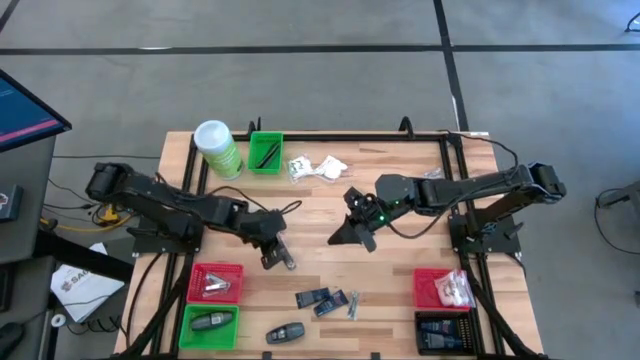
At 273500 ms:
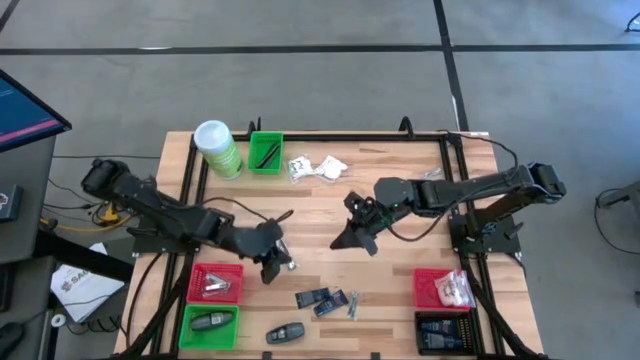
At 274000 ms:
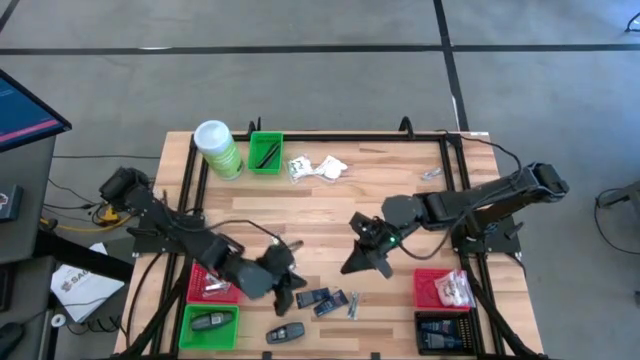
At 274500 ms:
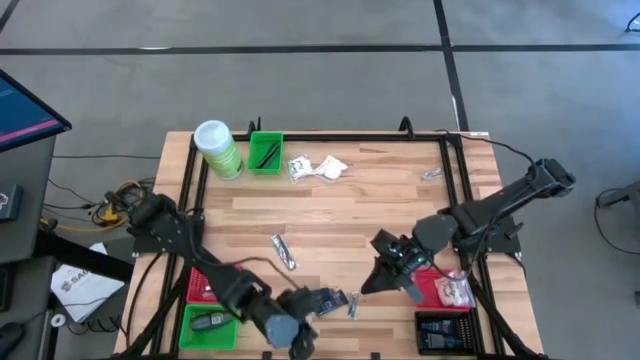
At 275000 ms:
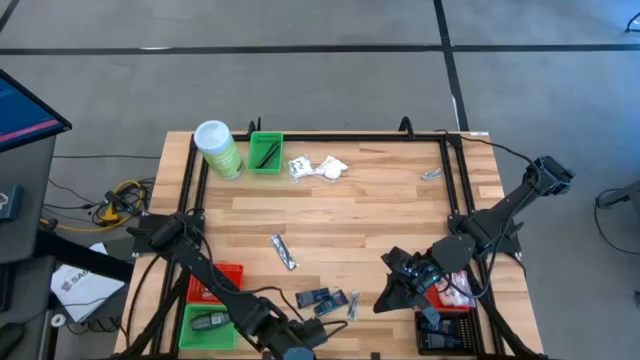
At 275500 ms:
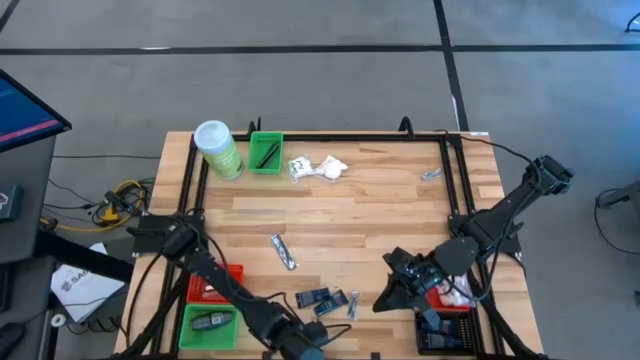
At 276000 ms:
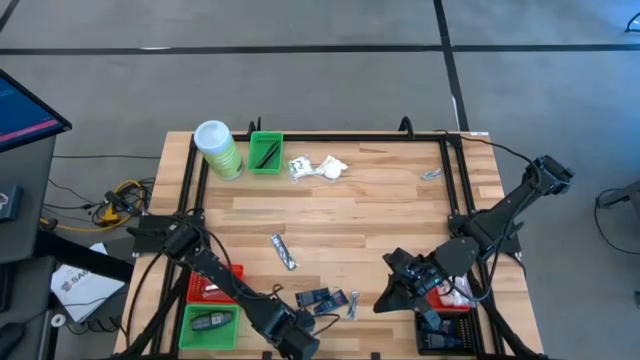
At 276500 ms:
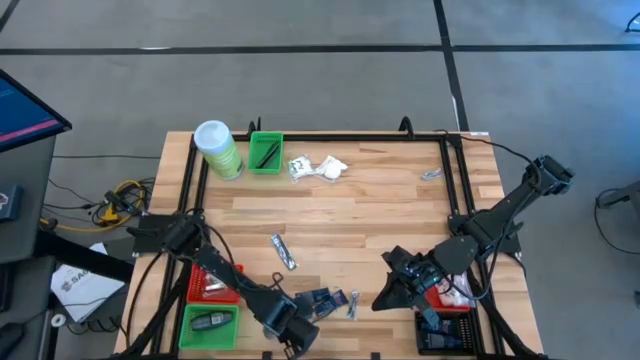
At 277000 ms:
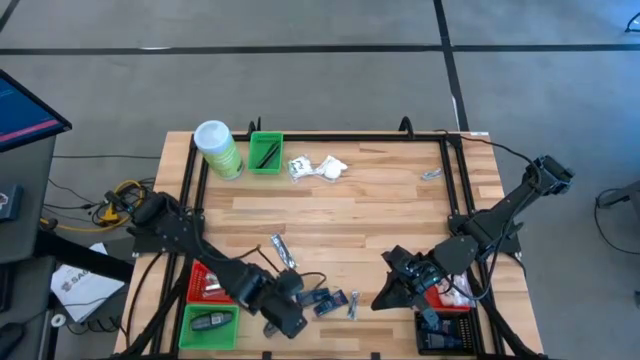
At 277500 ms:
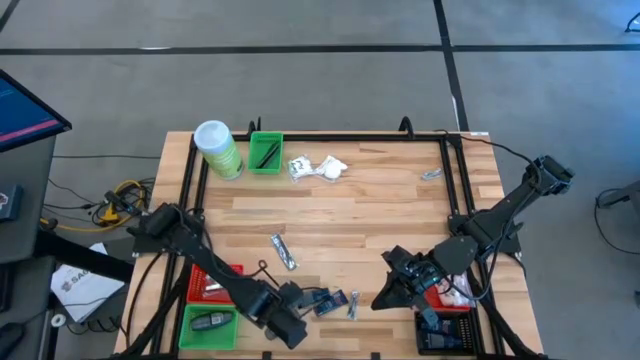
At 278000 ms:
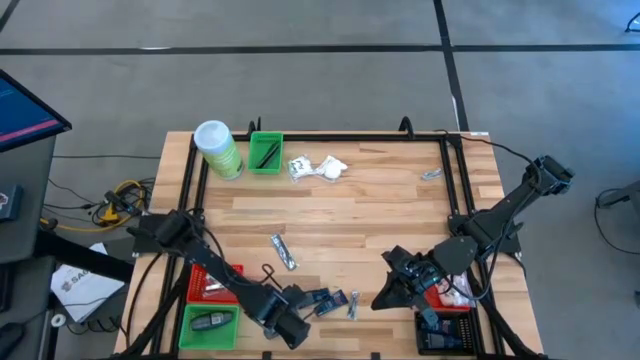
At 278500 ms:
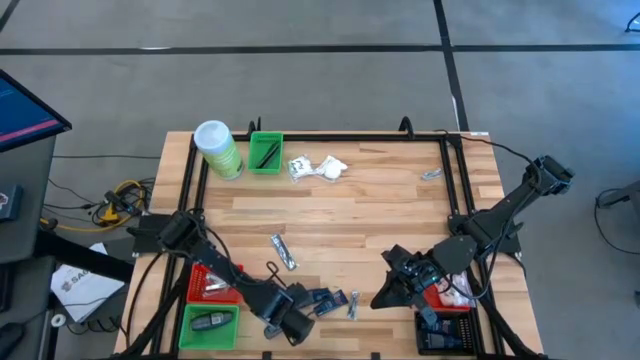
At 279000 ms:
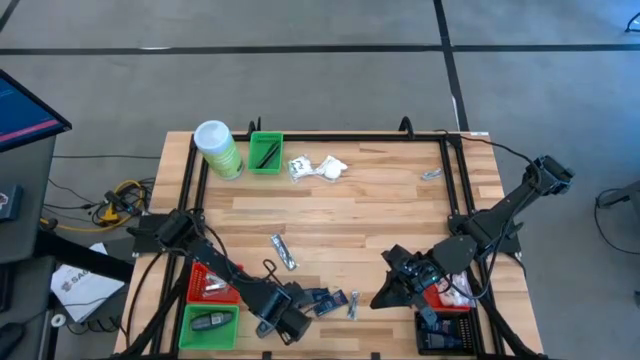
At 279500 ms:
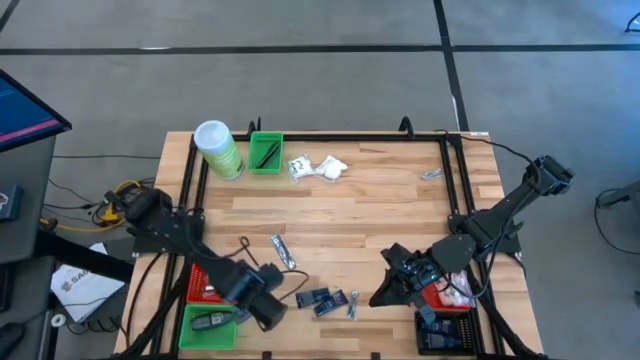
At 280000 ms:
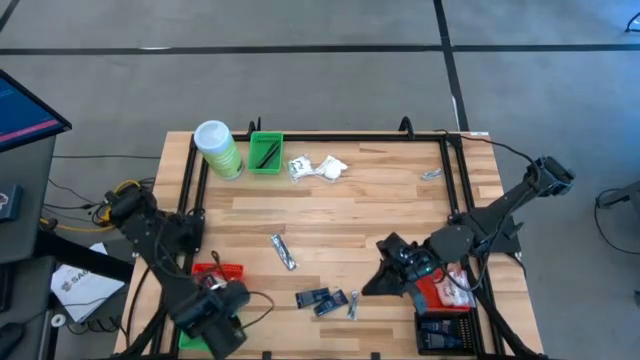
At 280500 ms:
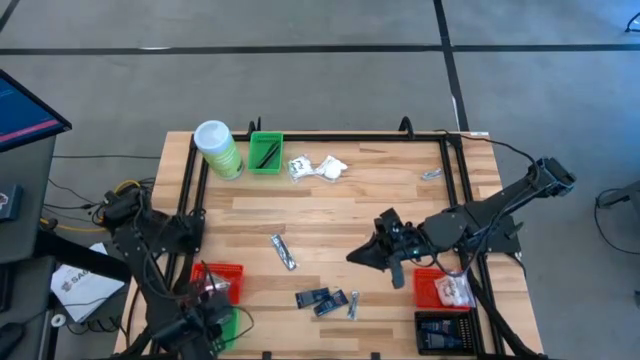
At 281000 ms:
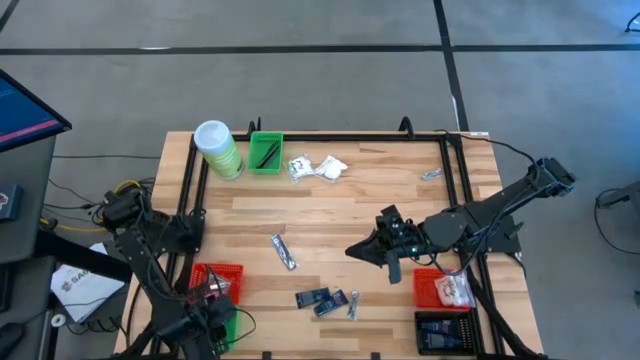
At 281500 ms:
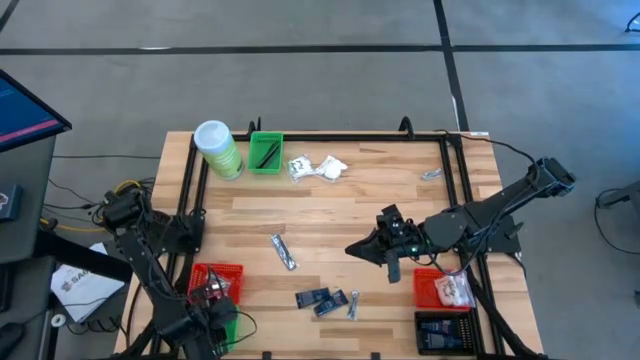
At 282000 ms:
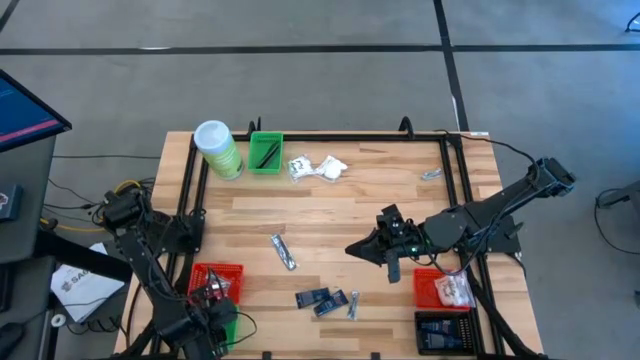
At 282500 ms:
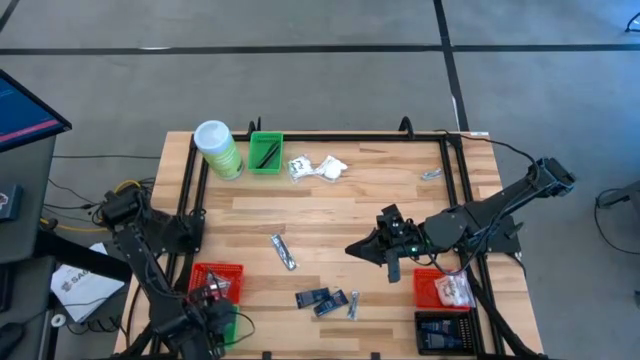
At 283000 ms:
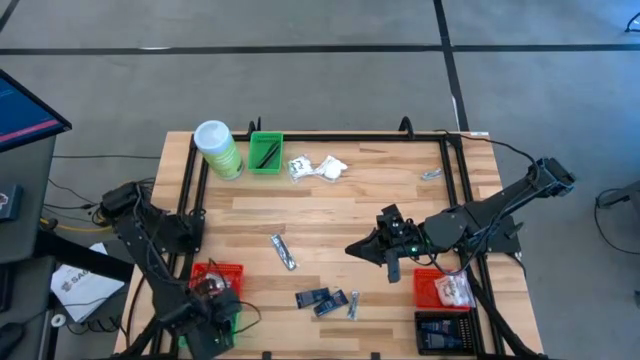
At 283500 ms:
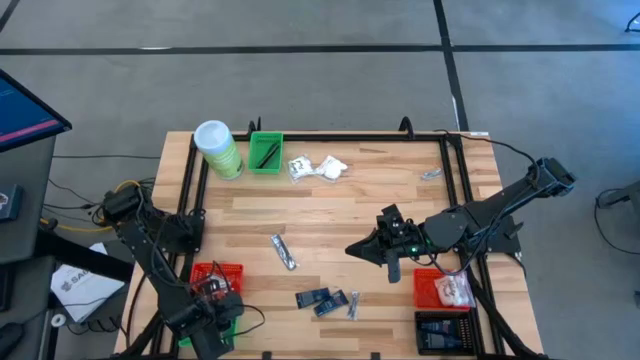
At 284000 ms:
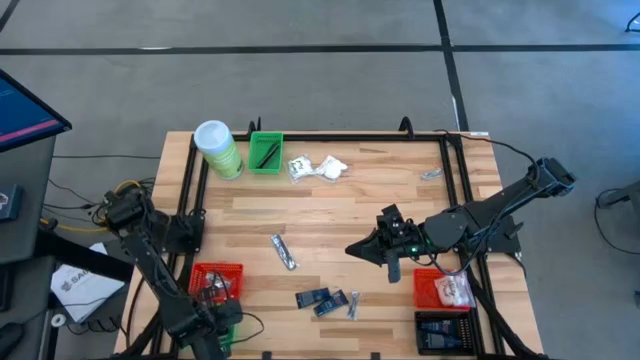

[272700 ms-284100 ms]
Task: Pick & Place Travel size toiletries
Put the deodorant into the bottom green bin

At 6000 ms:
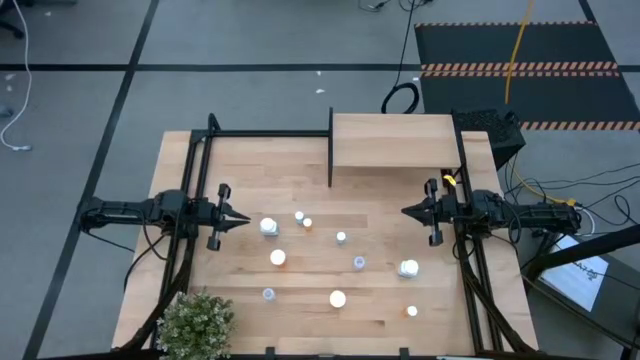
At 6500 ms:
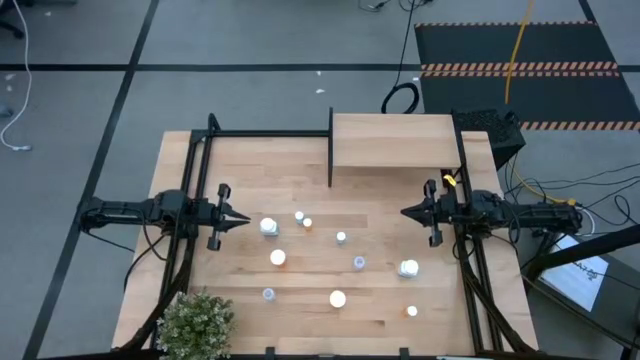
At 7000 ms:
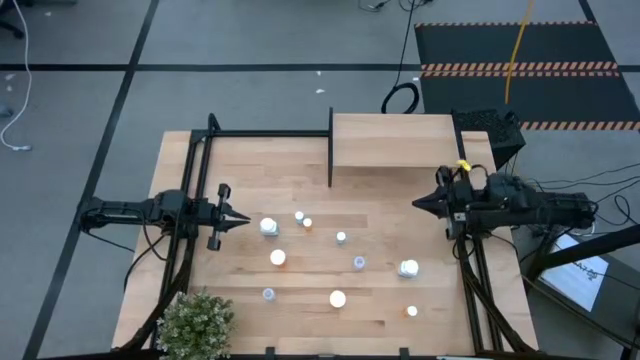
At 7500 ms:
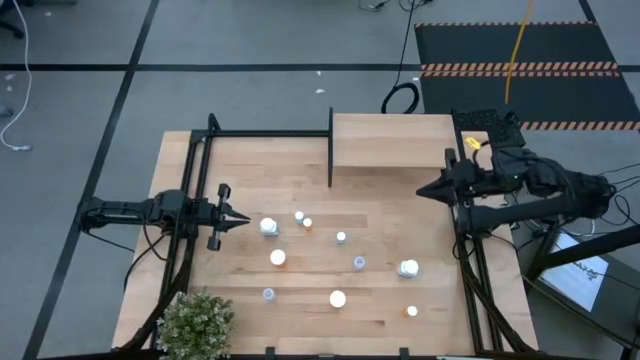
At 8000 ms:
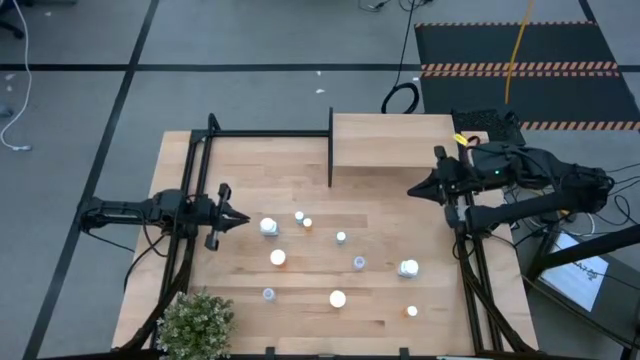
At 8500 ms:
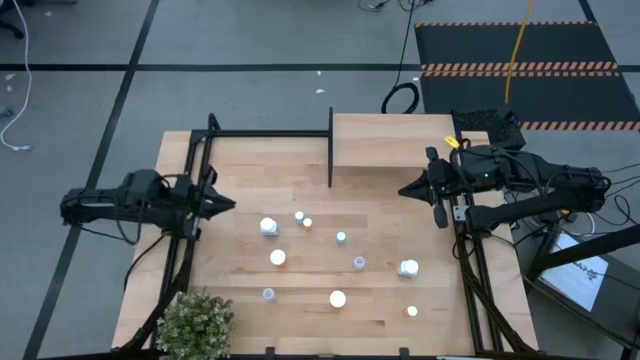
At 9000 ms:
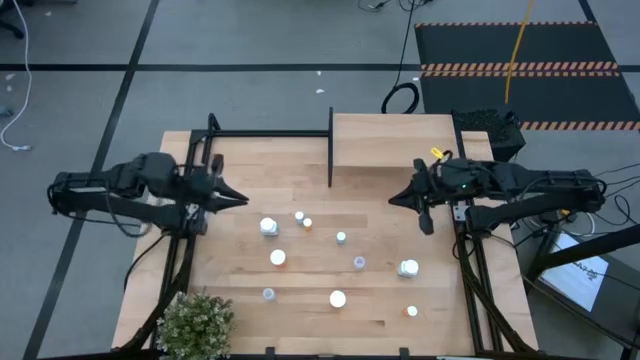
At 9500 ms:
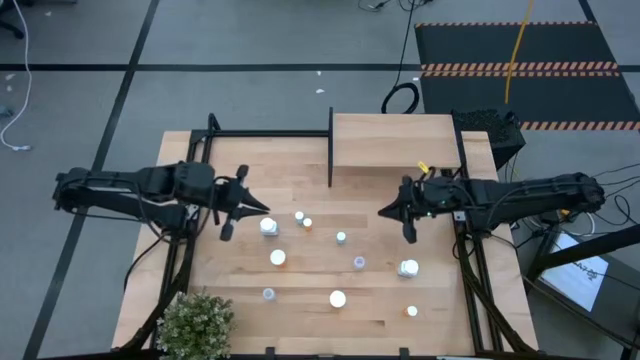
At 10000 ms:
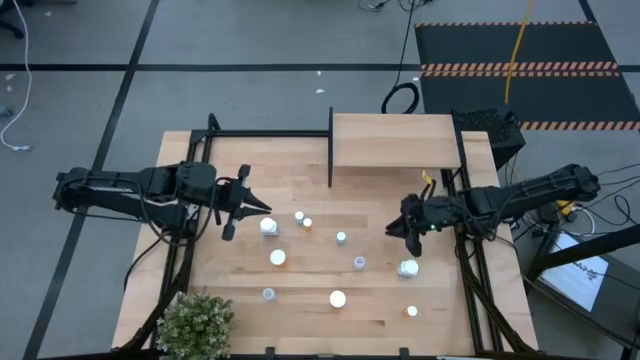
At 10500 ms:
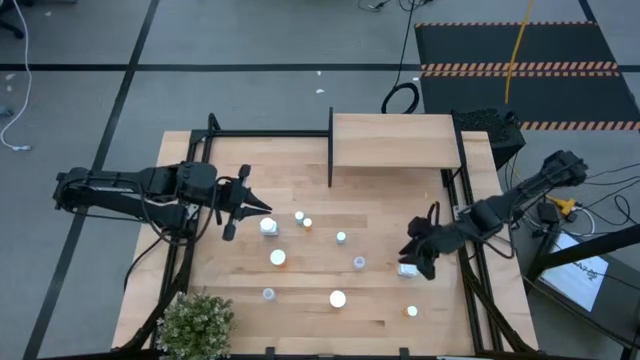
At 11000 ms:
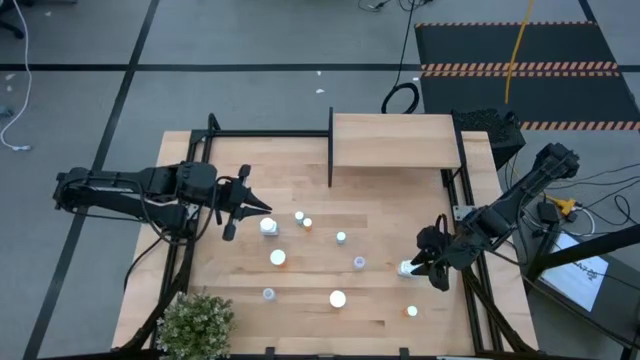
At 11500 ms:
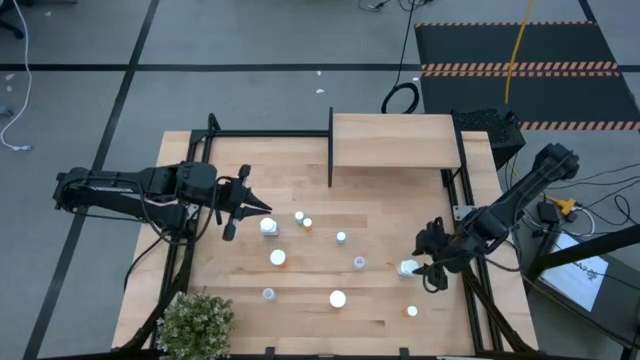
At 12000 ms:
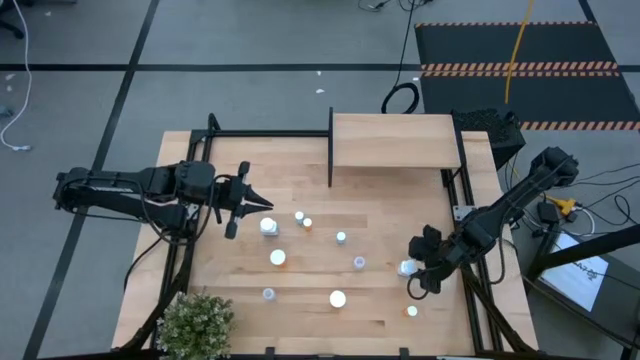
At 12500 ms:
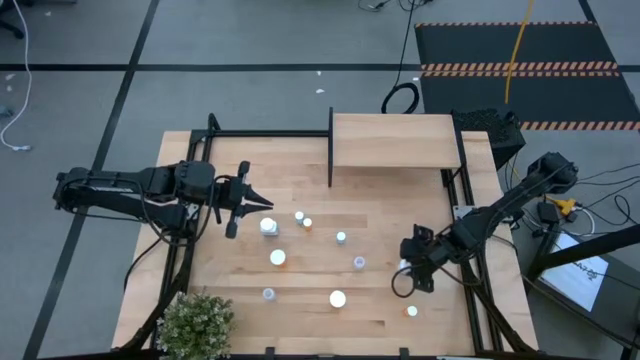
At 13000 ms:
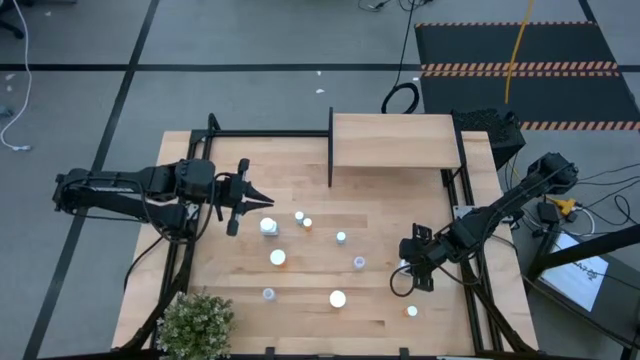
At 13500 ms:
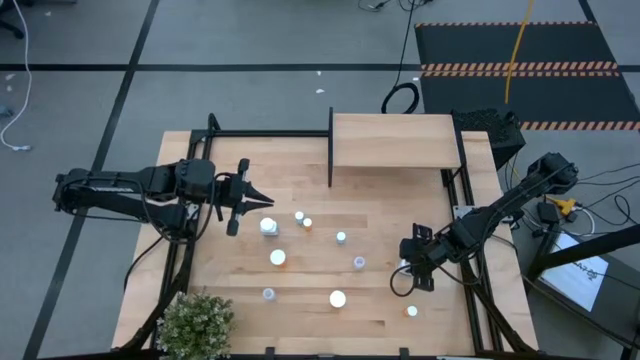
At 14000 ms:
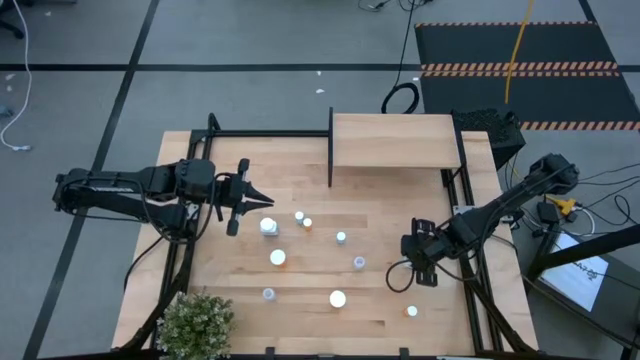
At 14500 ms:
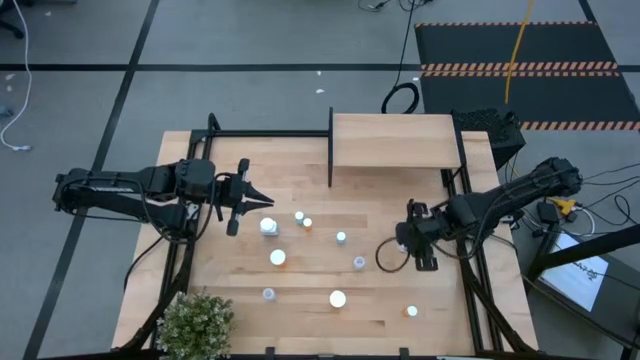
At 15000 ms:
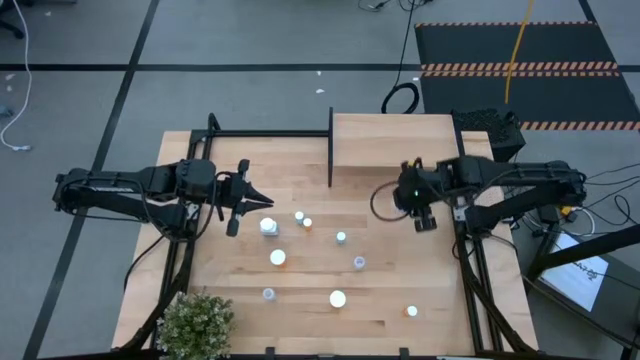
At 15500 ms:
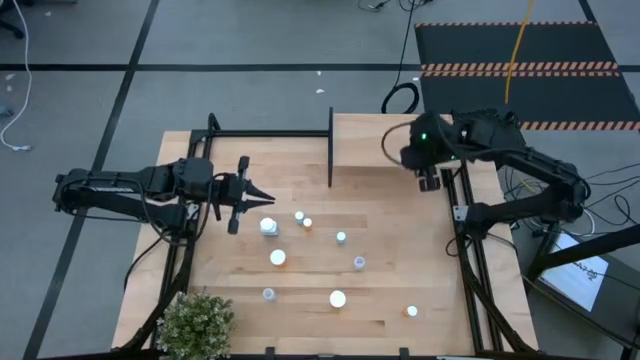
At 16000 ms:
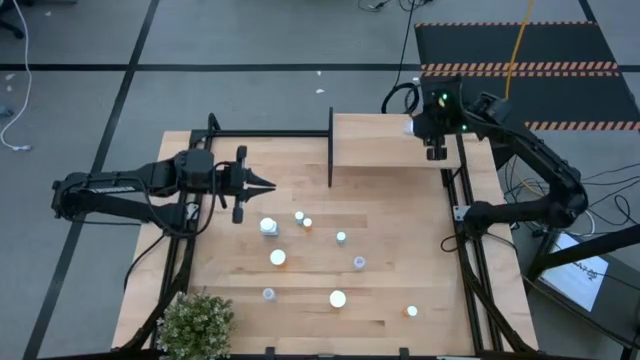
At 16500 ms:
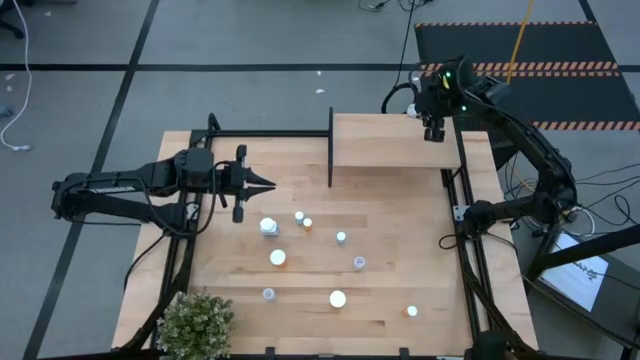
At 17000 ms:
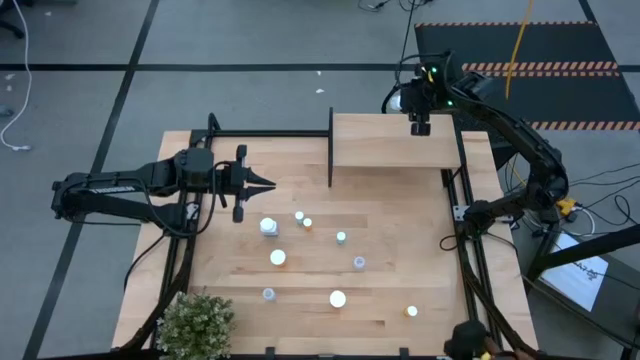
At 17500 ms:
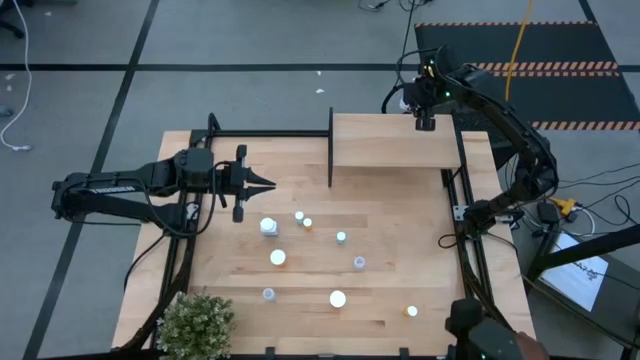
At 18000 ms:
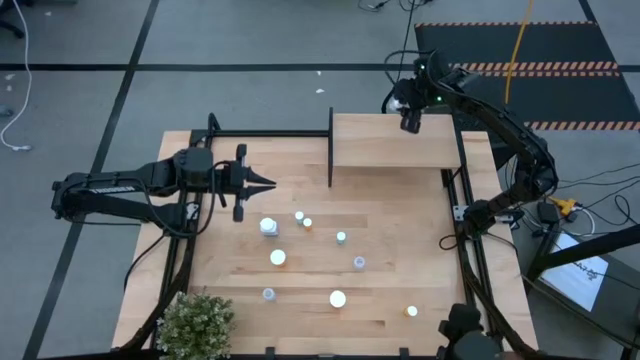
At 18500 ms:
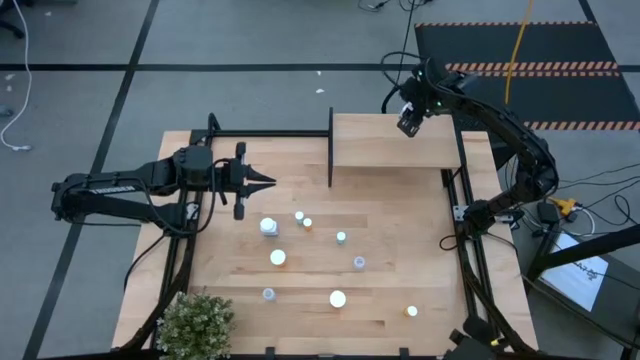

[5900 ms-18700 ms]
Task: Pick and place medicine bottles onto shelf by color
Put the bottom white pill bottle on the shelf
